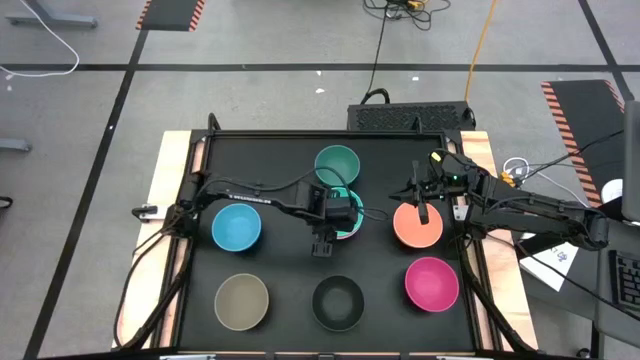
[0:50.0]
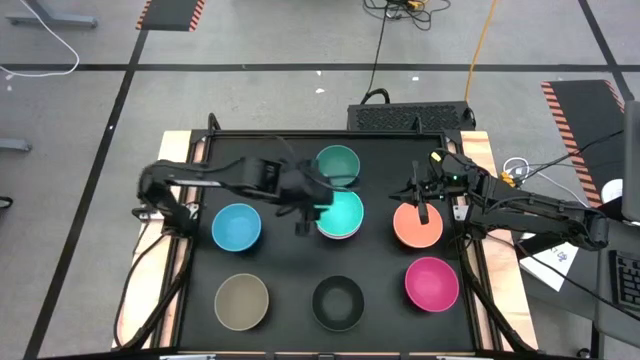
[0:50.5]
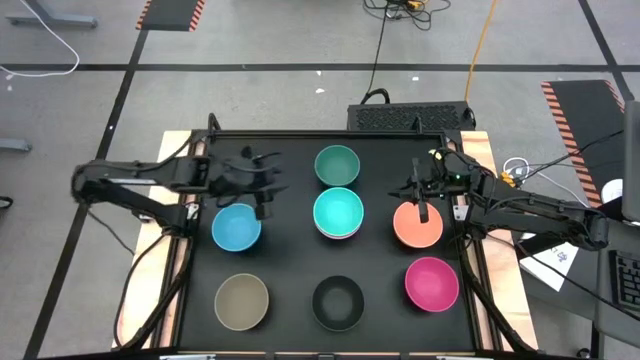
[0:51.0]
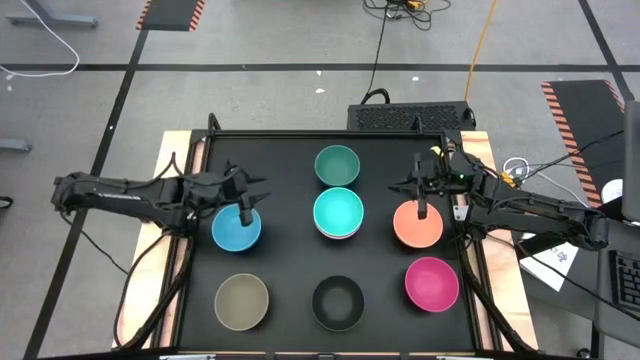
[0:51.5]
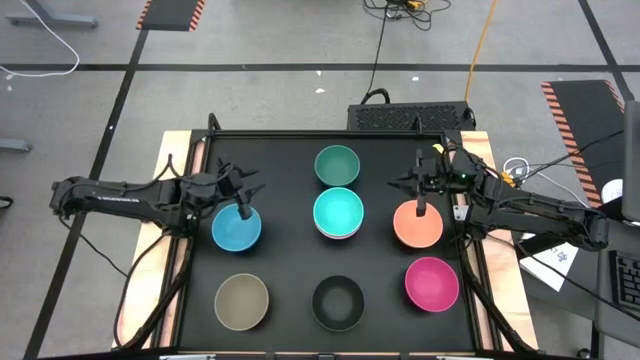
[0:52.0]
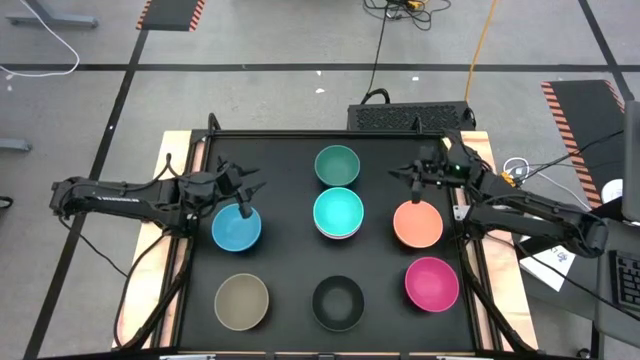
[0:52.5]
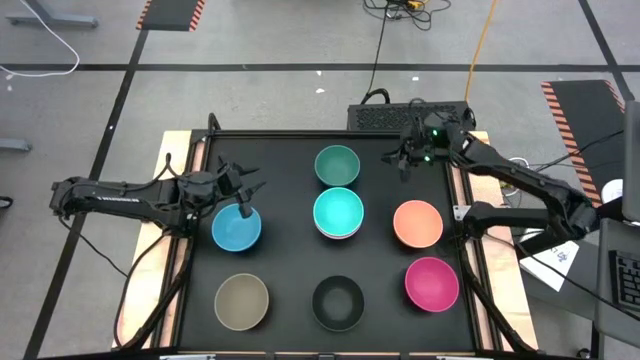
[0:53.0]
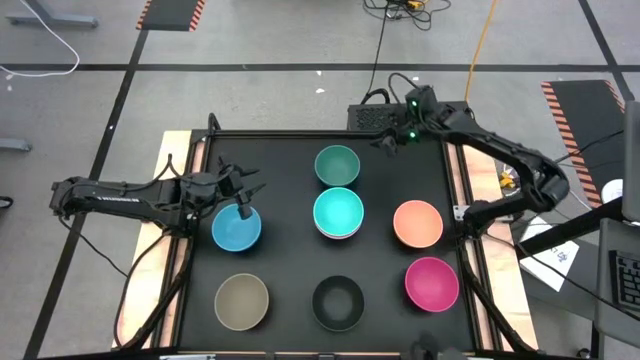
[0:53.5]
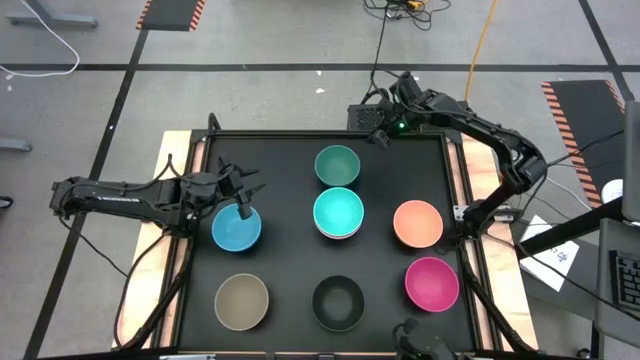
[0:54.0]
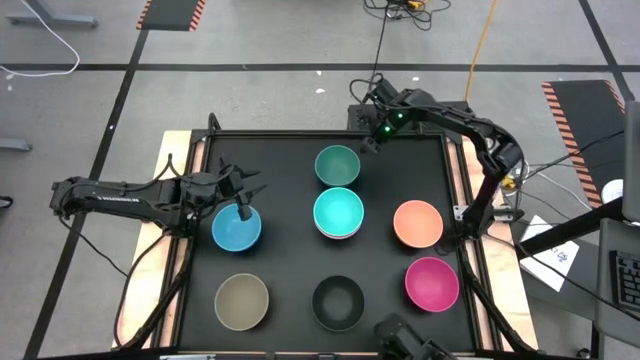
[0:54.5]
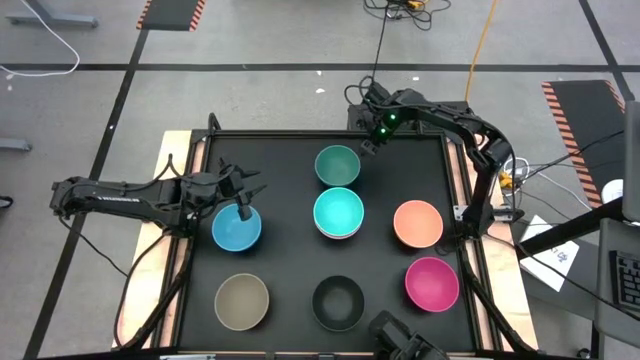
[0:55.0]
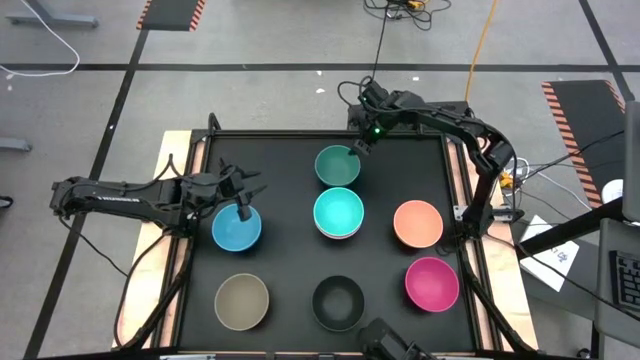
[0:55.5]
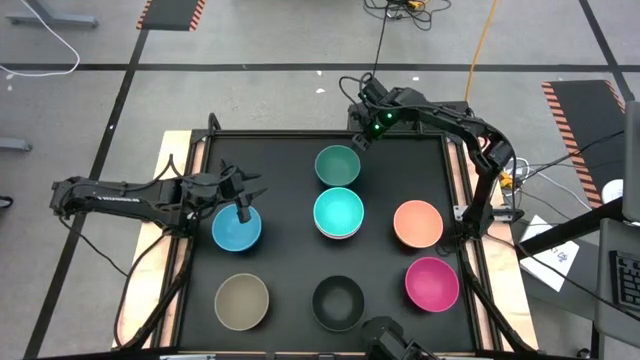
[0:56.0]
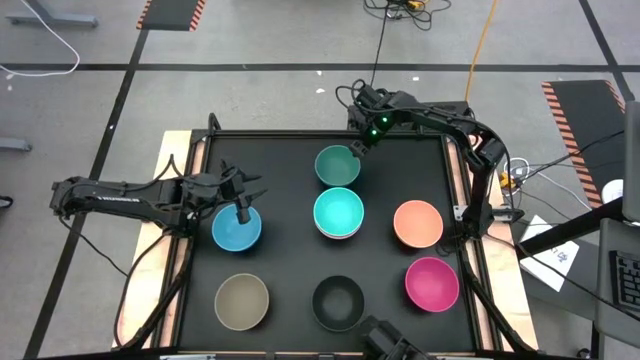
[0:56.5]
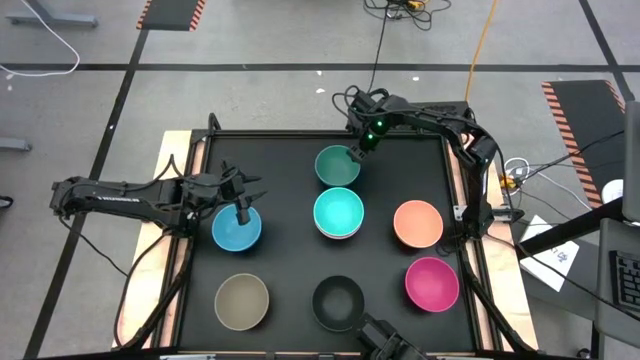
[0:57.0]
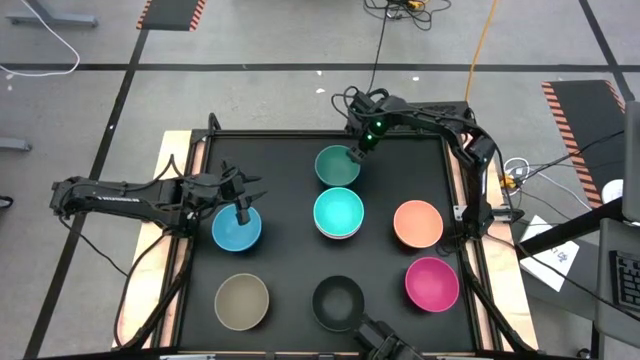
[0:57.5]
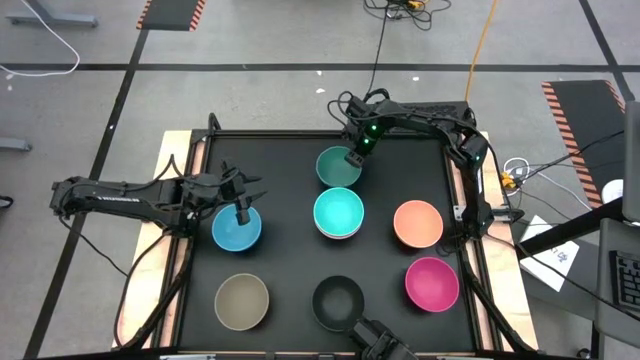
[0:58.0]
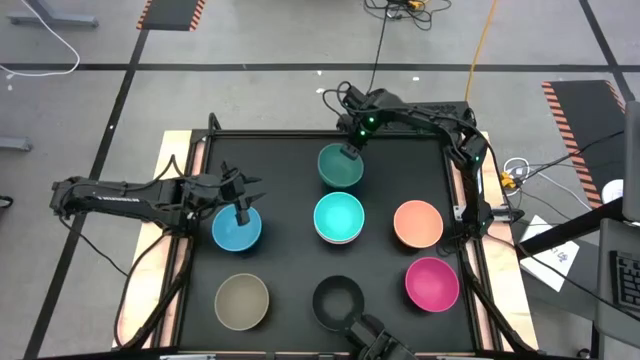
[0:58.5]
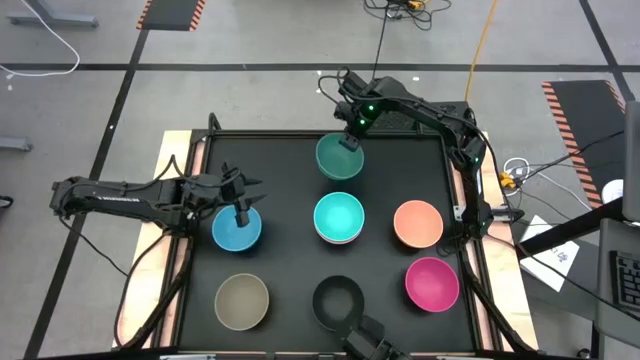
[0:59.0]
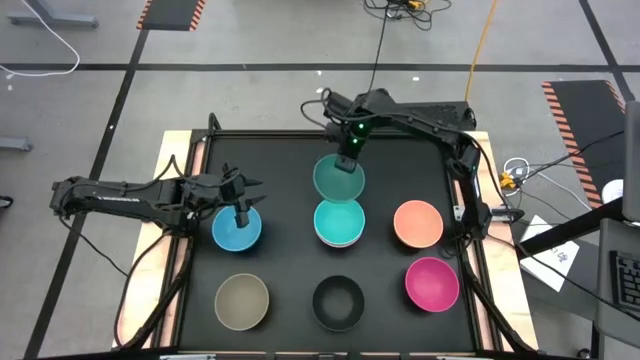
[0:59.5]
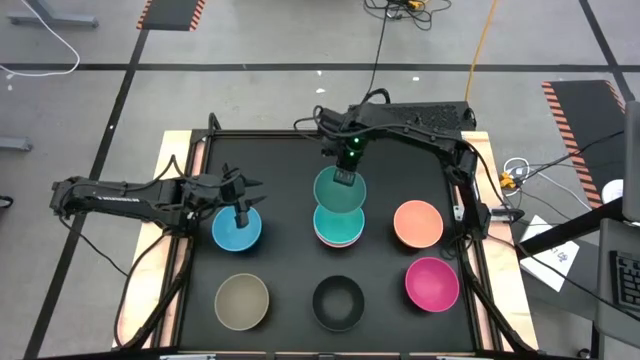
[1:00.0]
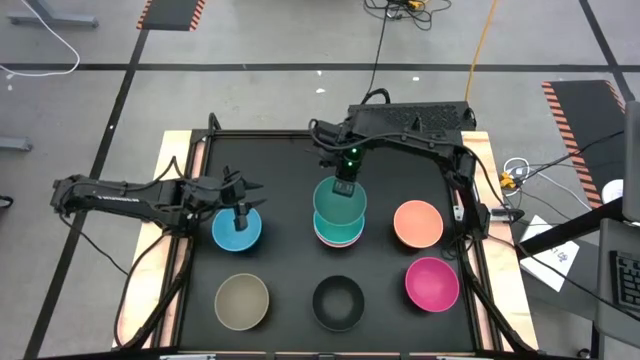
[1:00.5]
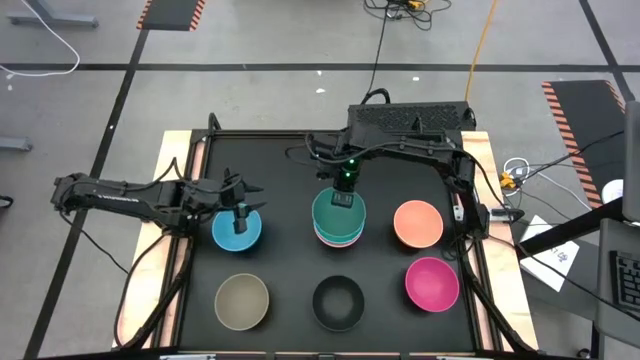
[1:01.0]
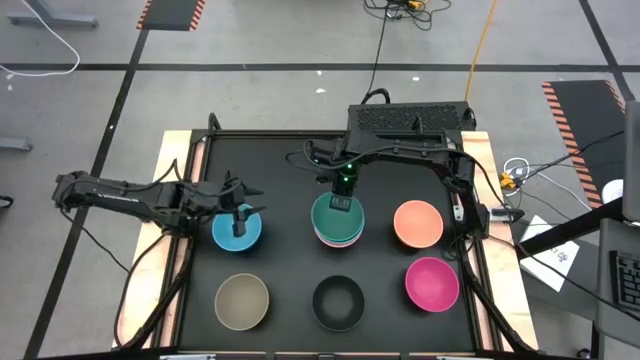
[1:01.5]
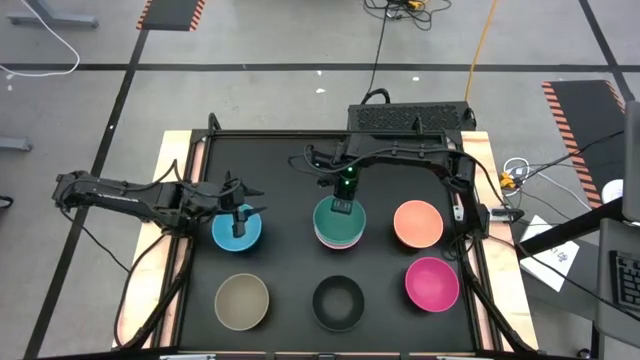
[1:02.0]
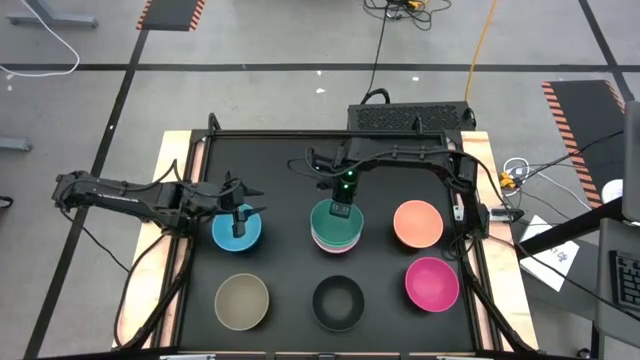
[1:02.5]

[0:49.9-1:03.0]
Task: Nest bowls inside each other
Stack the green bowl on top of the light blue bowl

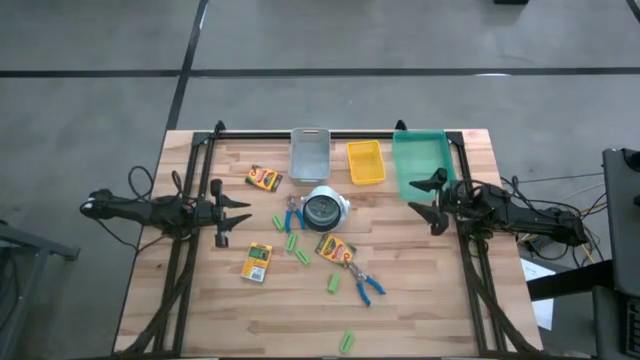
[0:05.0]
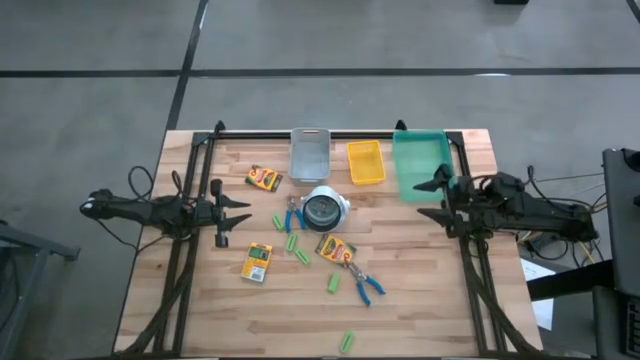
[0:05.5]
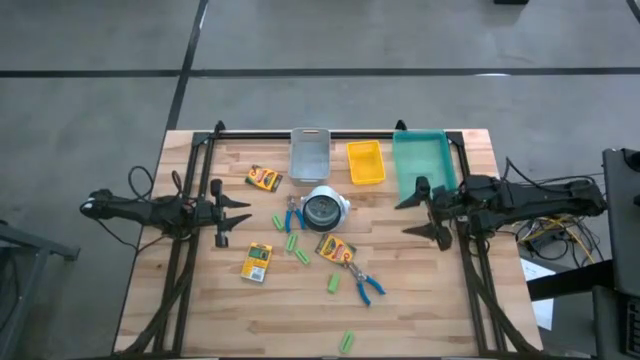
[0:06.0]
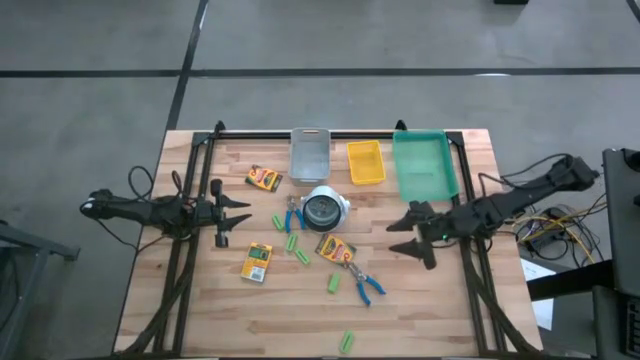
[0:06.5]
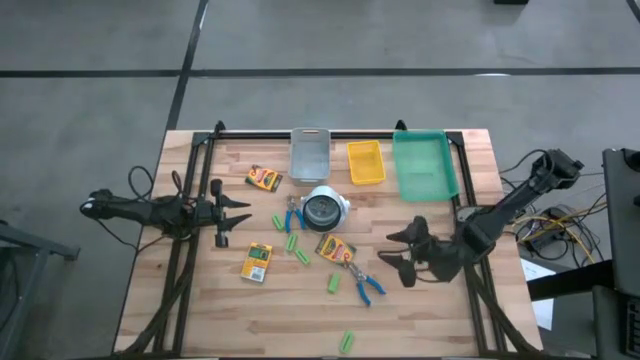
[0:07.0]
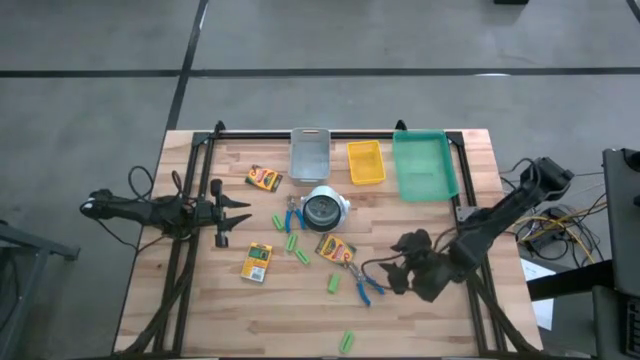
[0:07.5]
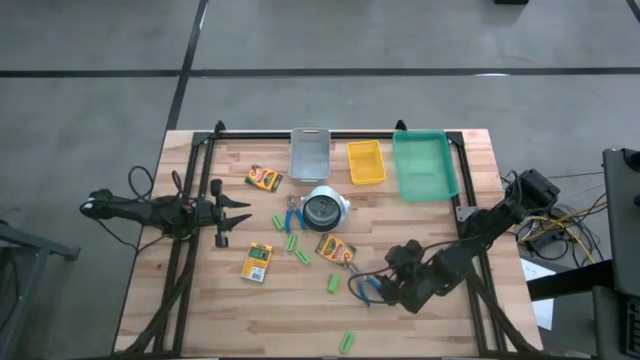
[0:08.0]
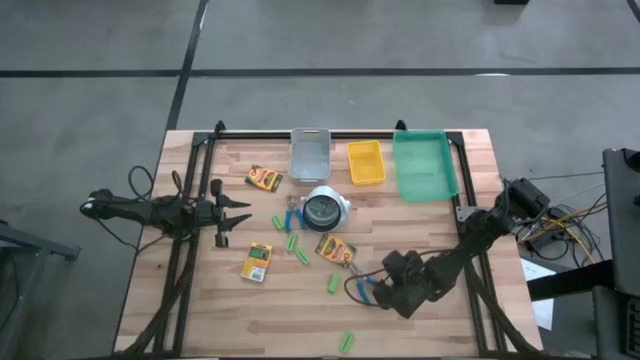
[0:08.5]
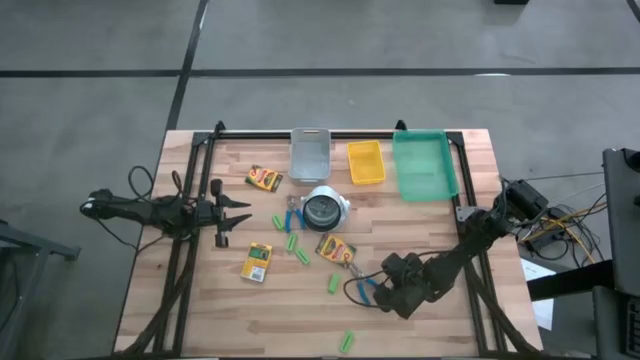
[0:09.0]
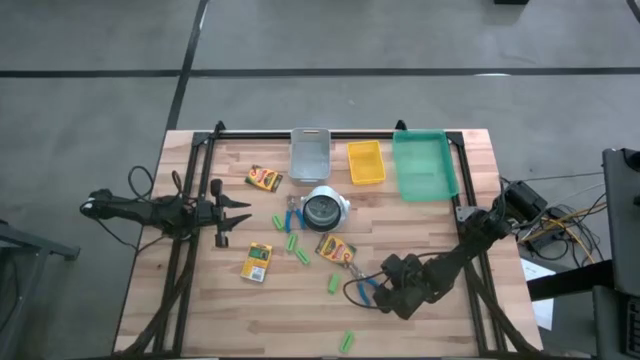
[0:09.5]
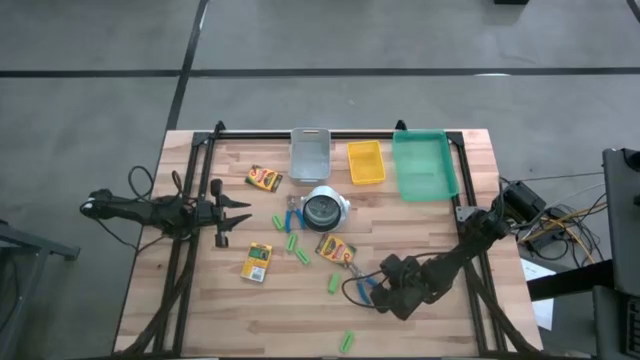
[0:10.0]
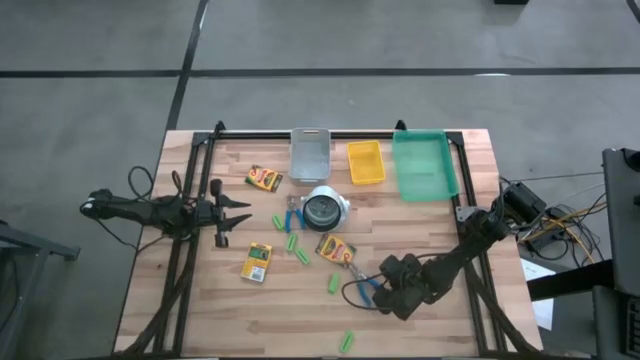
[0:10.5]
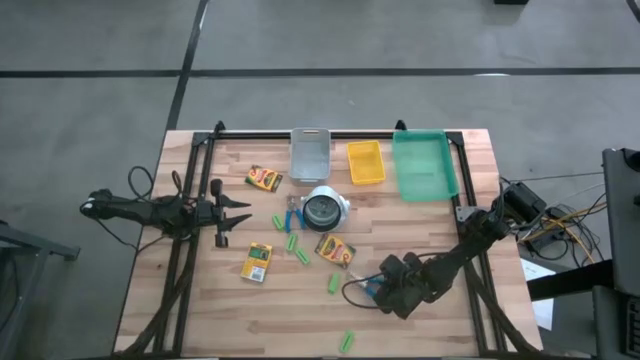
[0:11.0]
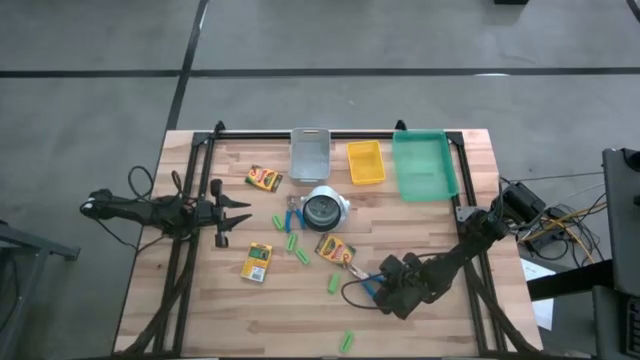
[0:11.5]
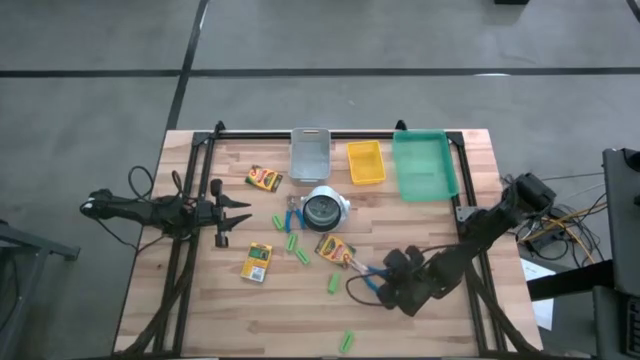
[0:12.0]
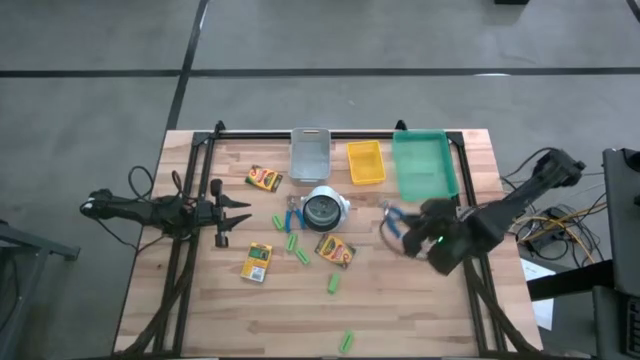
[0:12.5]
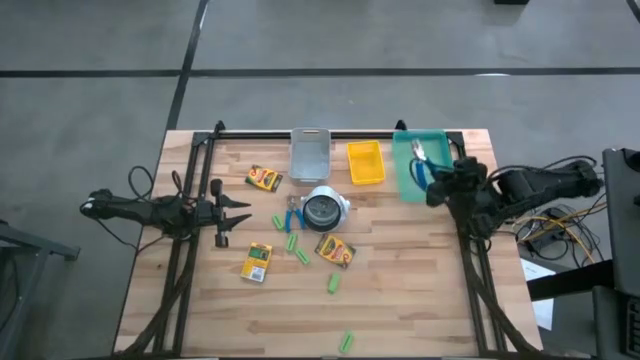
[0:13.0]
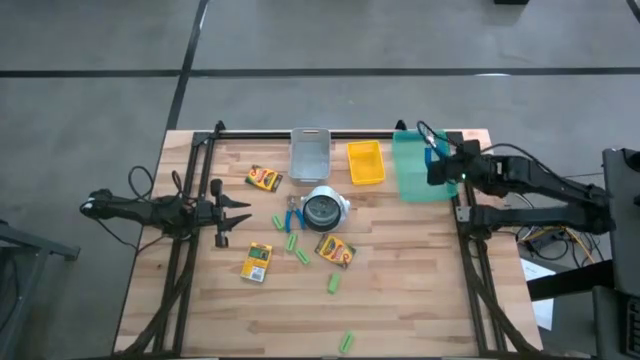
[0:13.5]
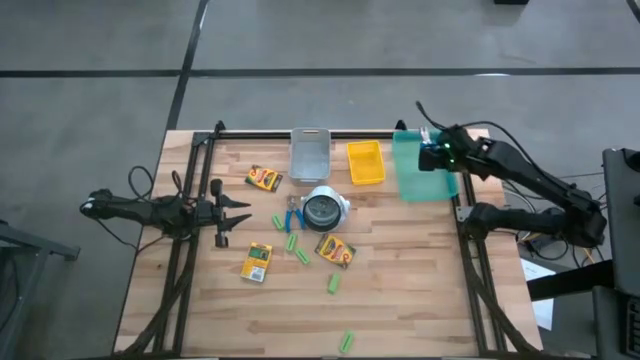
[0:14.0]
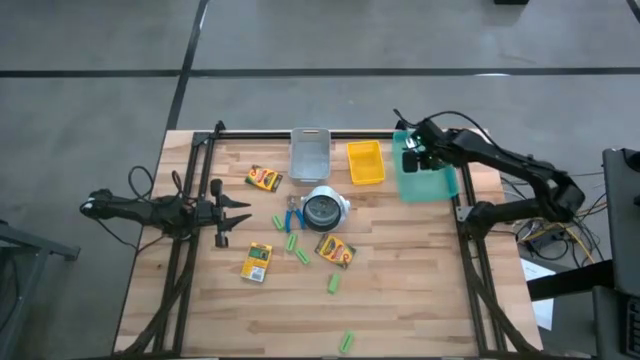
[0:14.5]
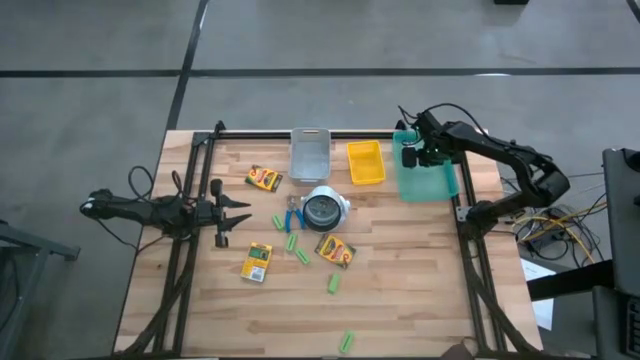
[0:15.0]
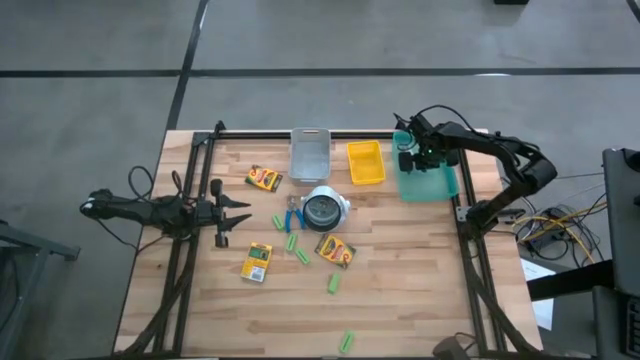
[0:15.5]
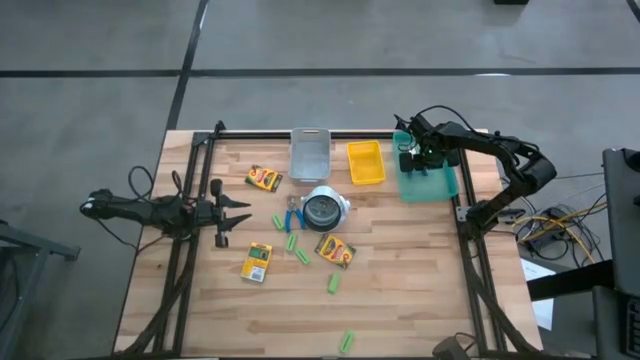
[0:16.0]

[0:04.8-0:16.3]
Task: Pick & Place School Supplies
Put the blue punch plier into the green bin
